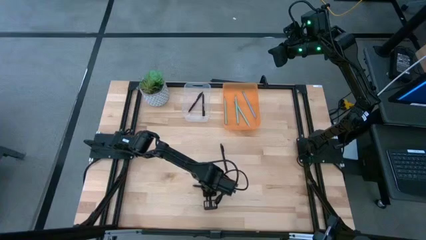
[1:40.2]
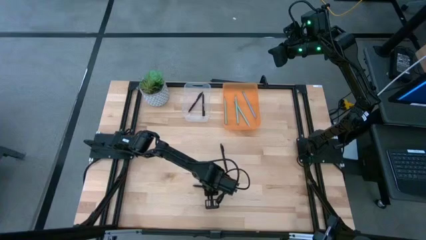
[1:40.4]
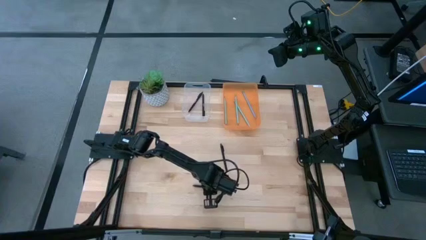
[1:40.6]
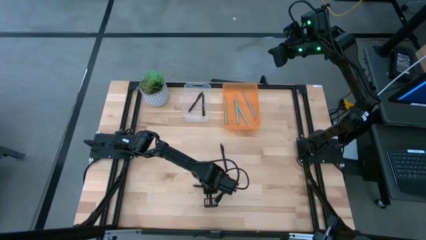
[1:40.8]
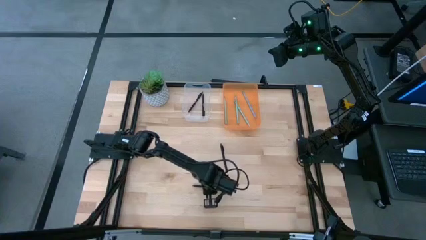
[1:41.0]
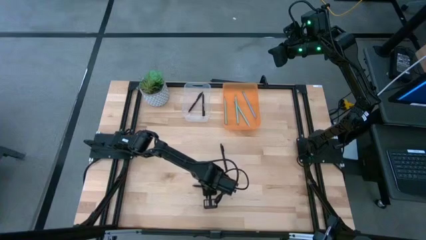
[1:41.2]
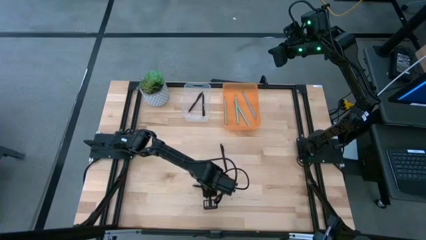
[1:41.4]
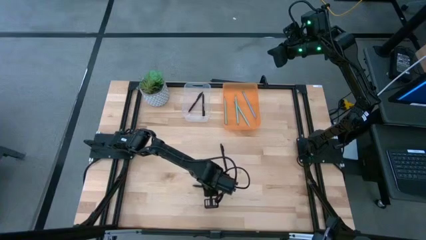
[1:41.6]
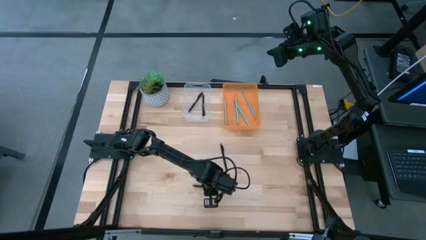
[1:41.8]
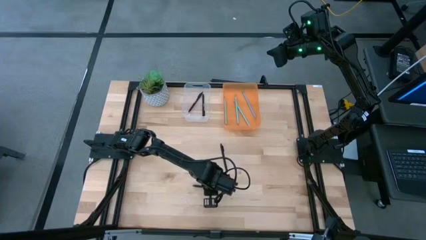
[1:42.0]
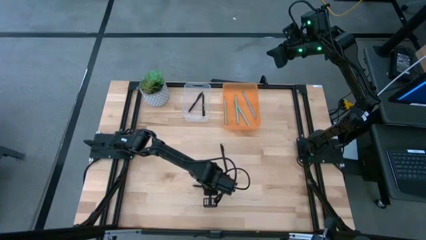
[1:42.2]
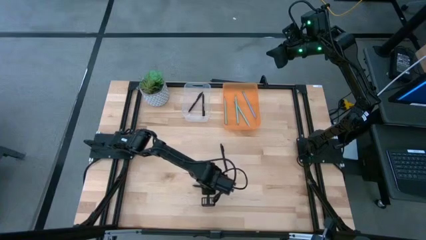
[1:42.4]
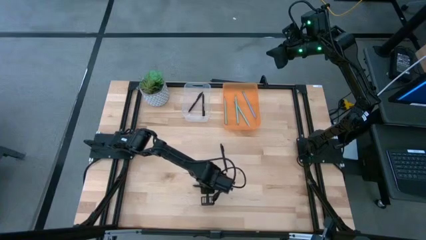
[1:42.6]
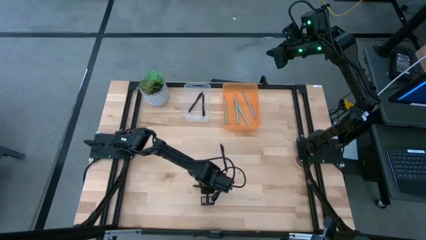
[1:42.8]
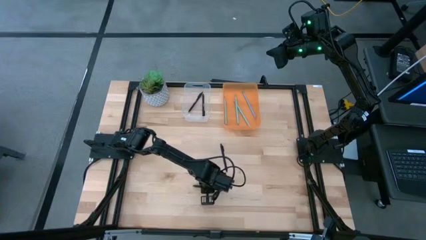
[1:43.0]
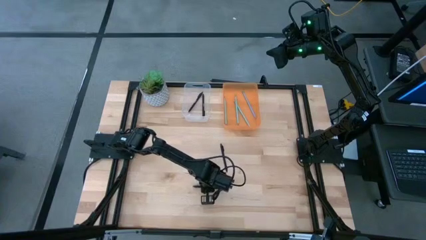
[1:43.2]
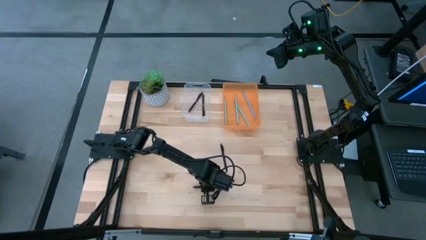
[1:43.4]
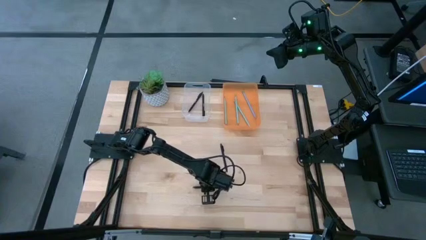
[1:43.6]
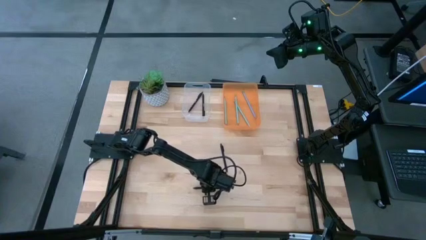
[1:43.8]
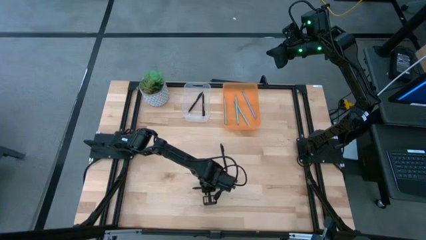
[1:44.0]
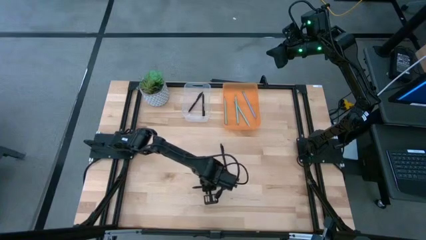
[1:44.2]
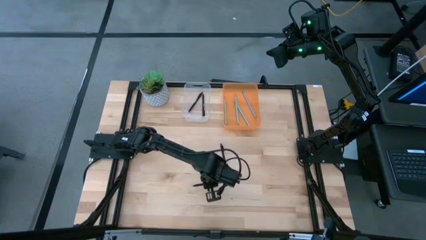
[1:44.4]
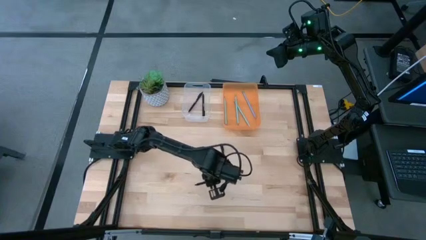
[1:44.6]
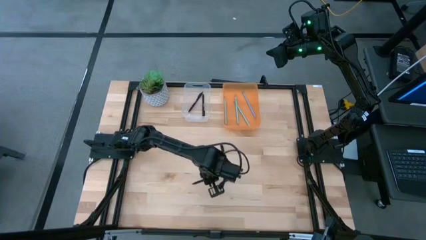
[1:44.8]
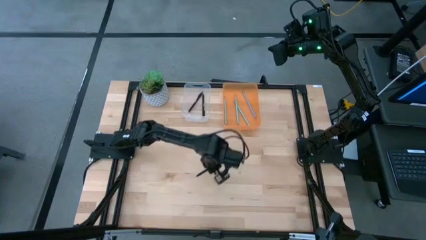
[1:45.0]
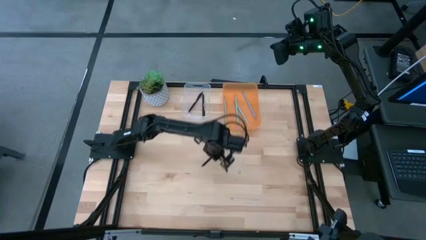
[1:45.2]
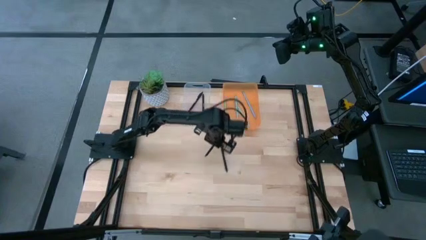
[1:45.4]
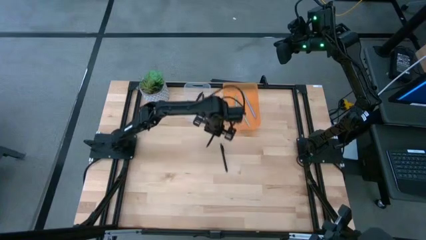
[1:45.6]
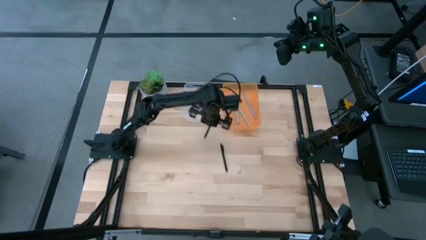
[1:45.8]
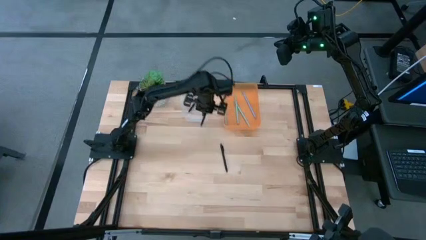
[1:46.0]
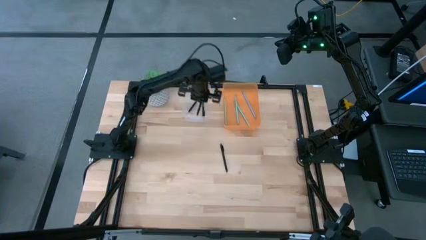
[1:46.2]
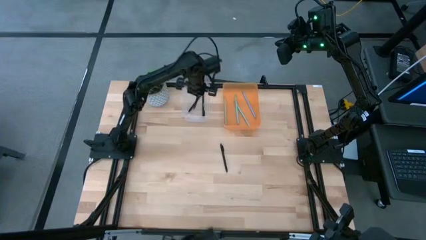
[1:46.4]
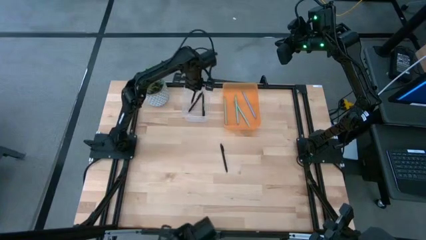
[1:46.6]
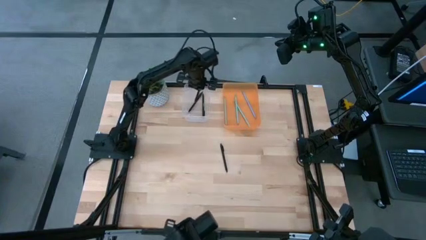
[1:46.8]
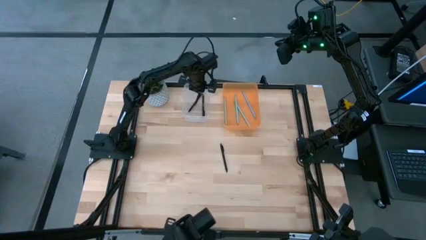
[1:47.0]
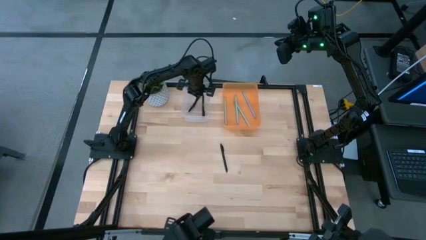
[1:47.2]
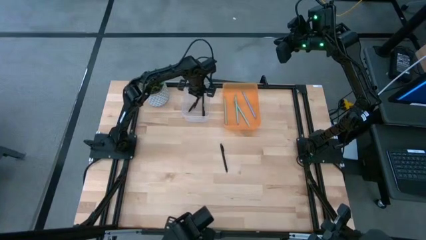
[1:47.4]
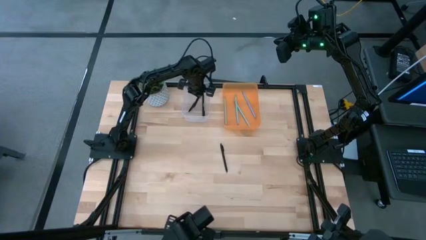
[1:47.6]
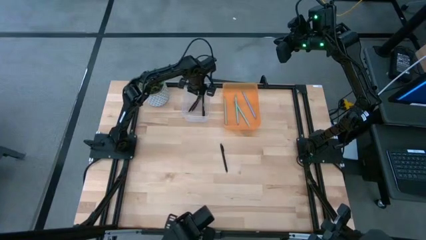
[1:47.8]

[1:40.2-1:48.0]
Task: Sort pens & pencils
Put the black pen into the transparent bin

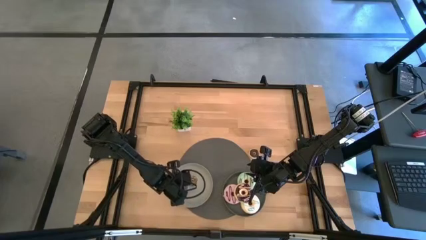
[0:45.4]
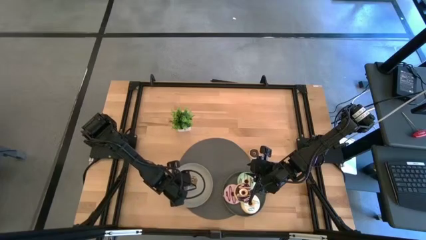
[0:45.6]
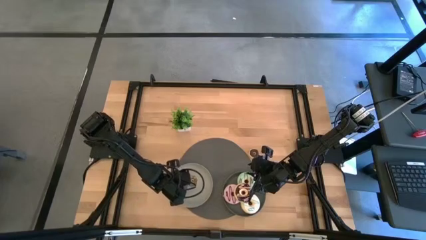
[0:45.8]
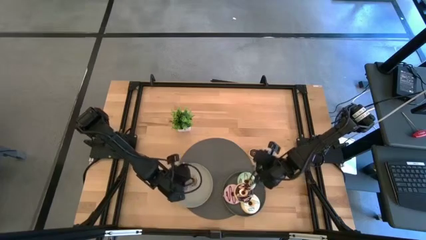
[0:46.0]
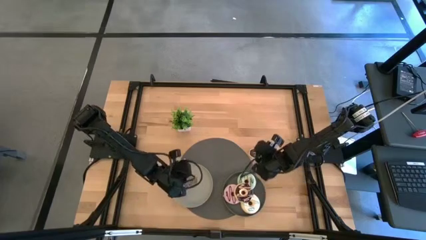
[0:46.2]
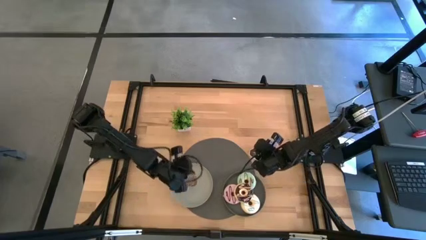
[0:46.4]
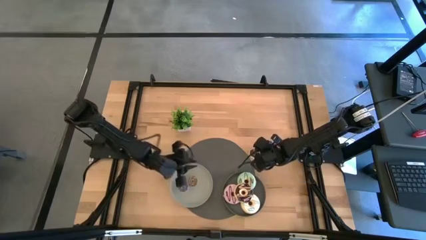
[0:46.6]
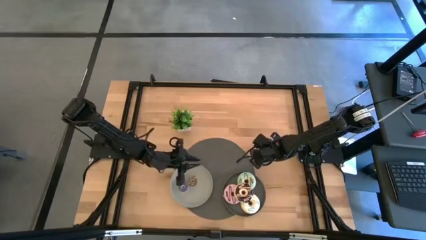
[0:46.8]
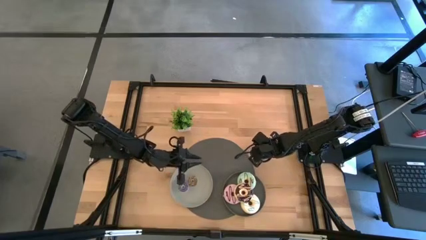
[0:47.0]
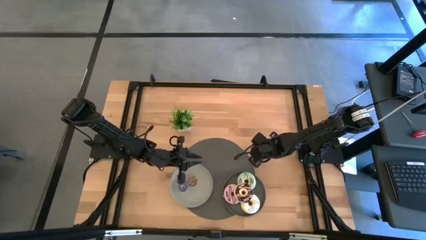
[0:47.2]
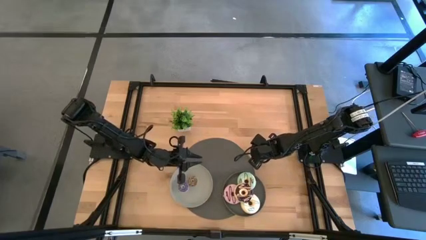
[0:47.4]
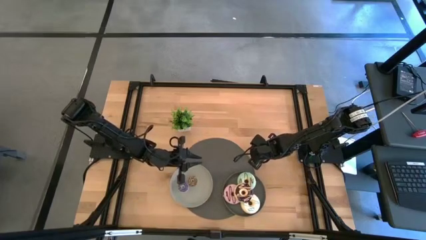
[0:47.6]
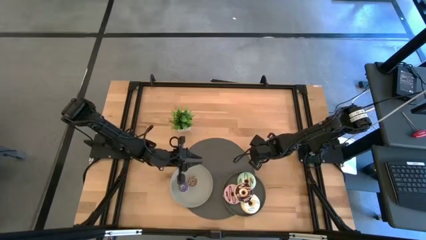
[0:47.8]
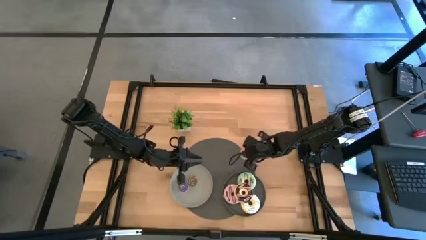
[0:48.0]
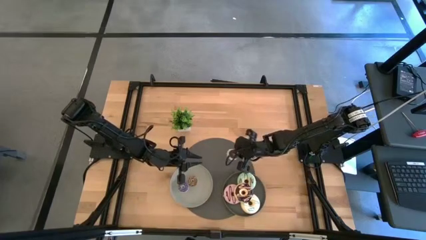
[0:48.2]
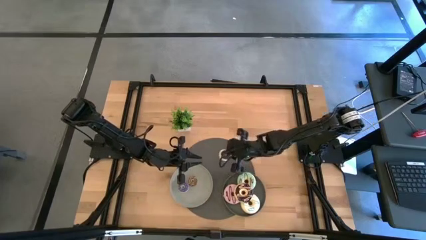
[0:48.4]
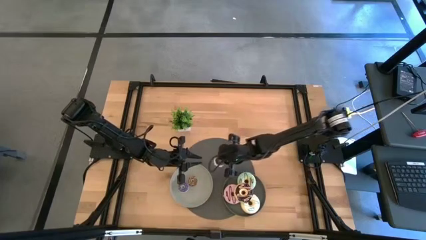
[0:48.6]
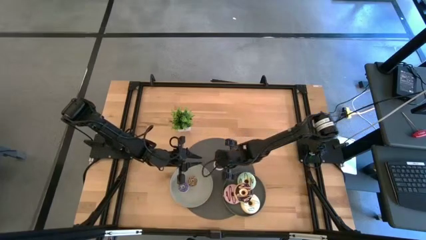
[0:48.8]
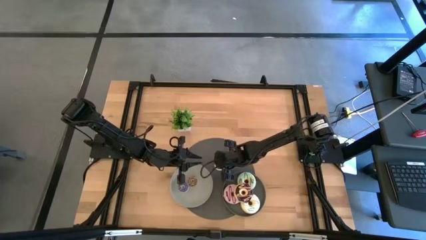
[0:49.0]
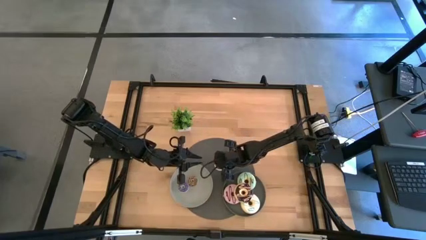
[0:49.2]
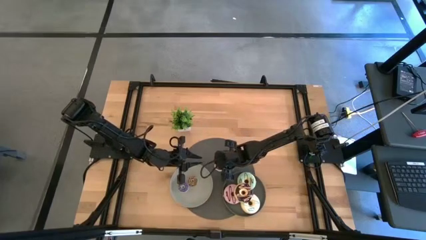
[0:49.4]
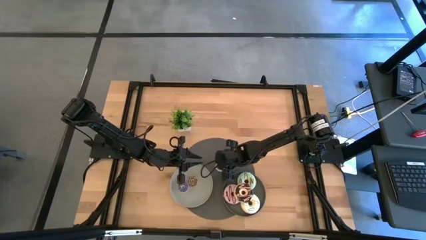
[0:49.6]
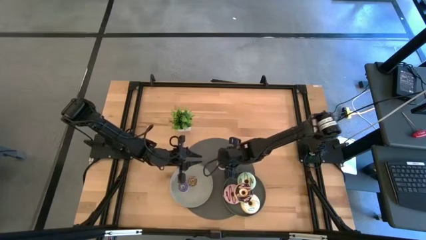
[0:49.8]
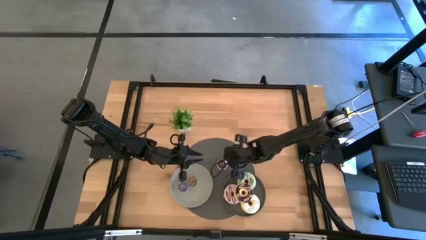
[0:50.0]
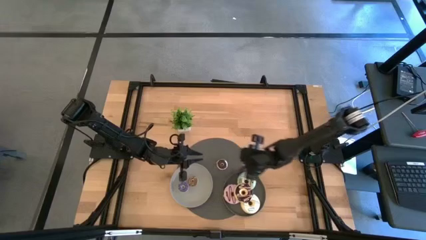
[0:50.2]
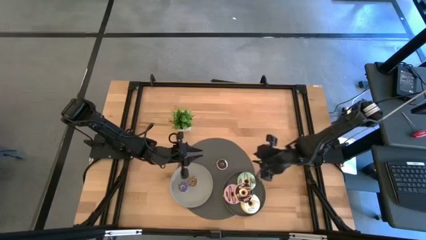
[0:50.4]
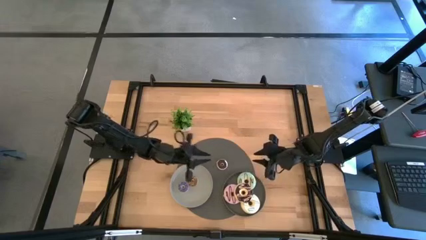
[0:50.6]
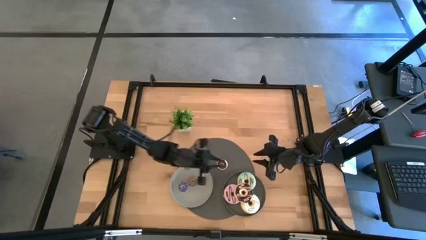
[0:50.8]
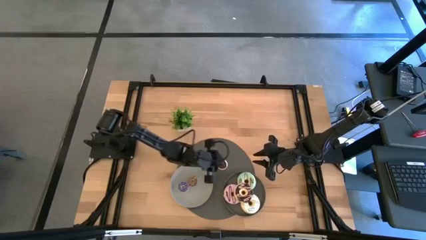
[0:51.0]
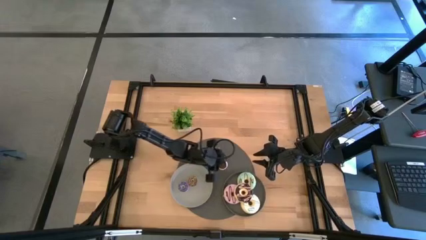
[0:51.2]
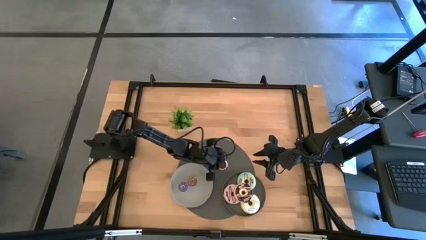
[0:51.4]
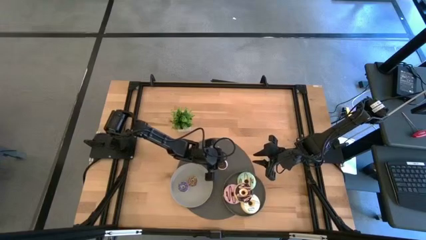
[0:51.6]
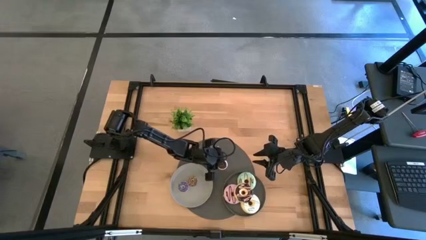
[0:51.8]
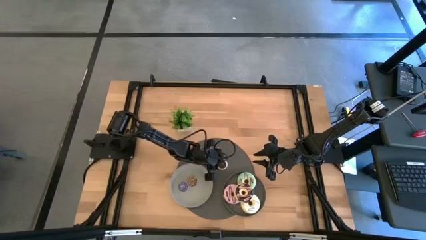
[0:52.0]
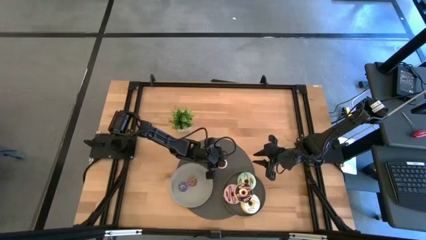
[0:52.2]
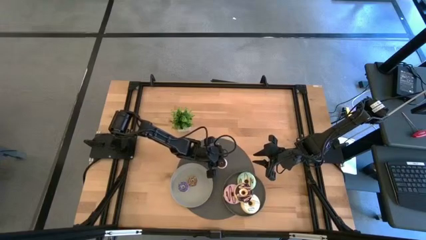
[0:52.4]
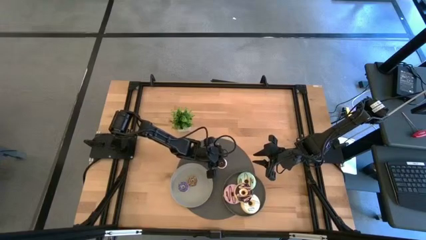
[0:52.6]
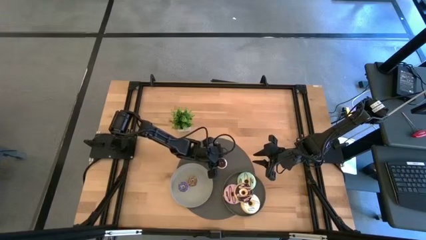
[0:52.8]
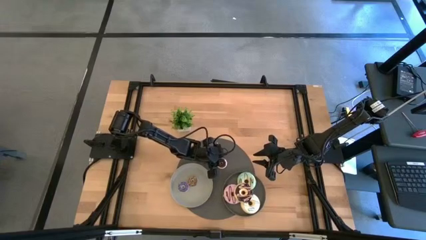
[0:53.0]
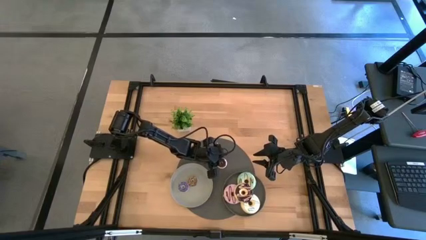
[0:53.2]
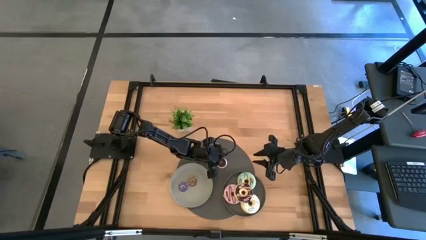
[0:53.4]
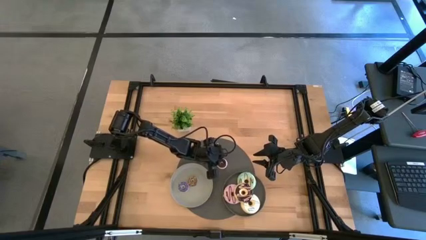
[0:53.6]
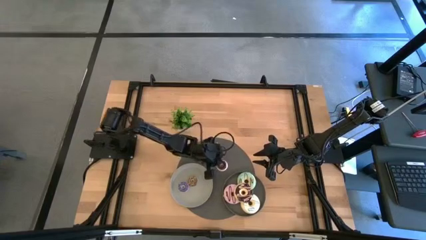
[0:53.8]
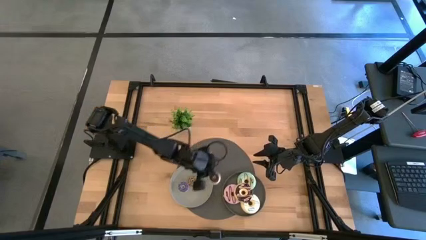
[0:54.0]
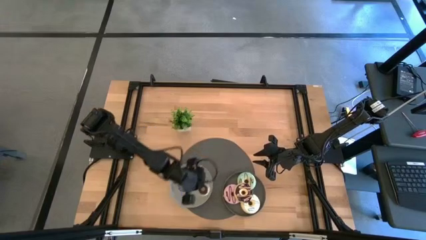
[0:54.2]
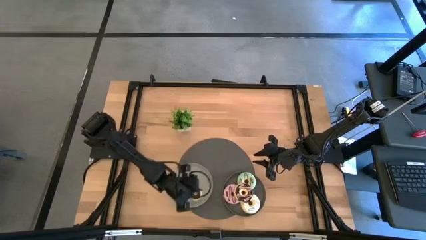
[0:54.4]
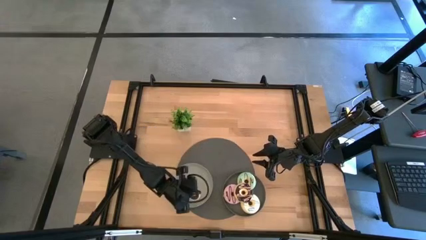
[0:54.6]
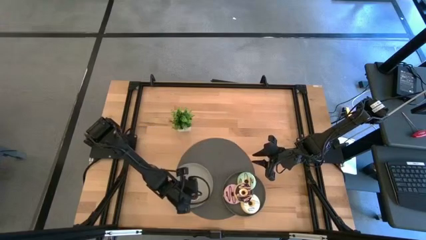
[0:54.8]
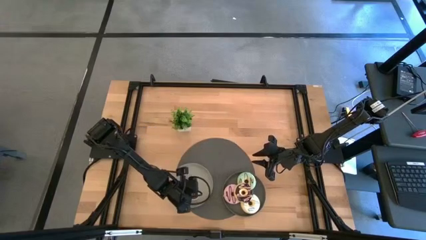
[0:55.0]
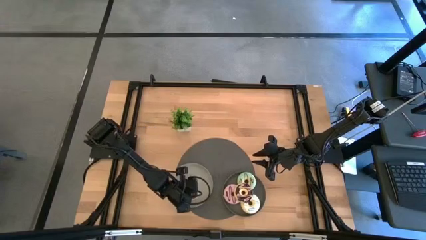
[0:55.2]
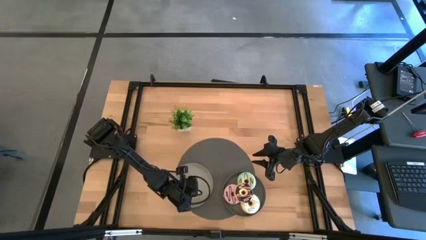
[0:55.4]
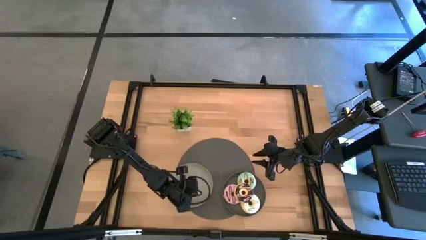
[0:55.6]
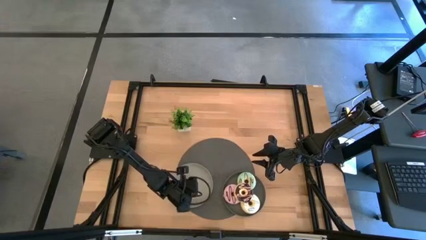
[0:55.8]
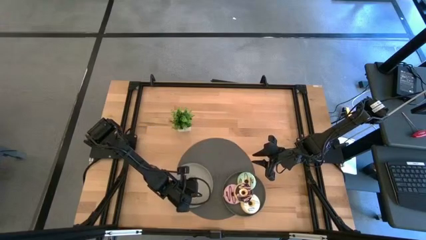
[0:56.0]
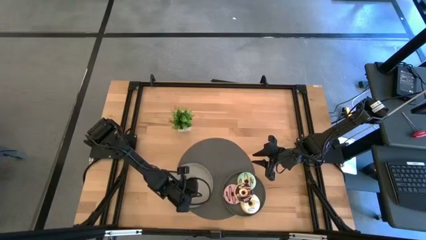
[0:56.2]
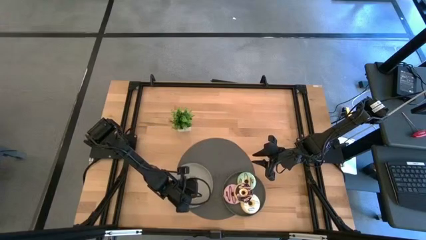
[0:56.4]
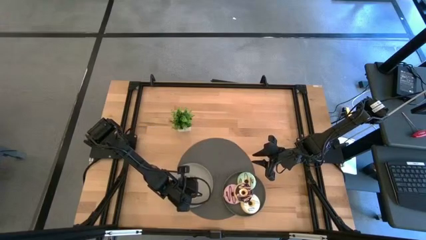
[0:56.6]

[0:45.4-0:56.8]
Task: Pick & Place donuts
Put the small black donut on the light grey plate
